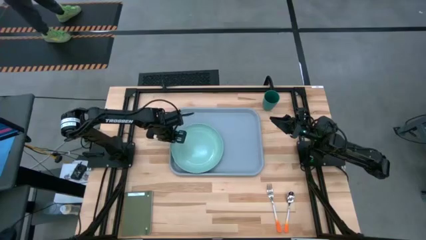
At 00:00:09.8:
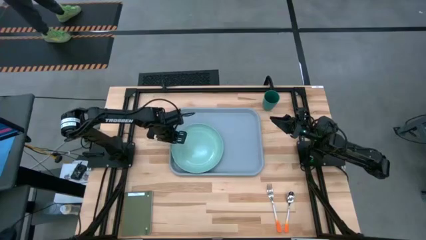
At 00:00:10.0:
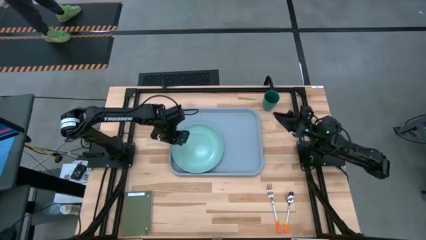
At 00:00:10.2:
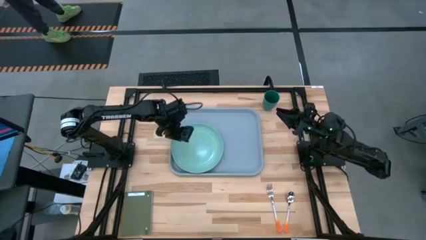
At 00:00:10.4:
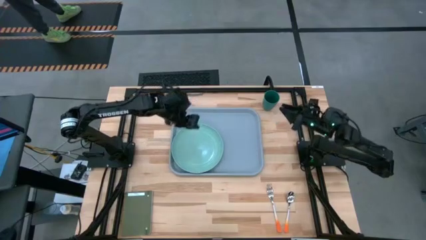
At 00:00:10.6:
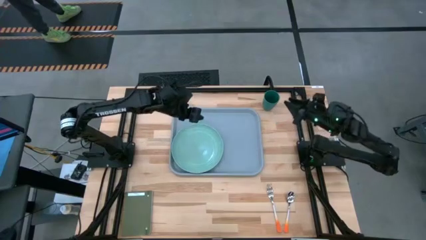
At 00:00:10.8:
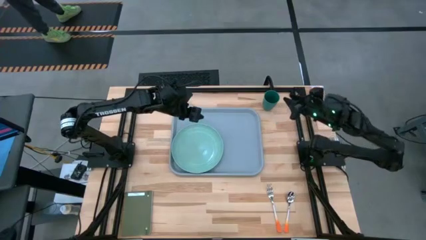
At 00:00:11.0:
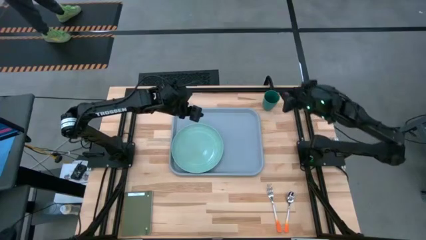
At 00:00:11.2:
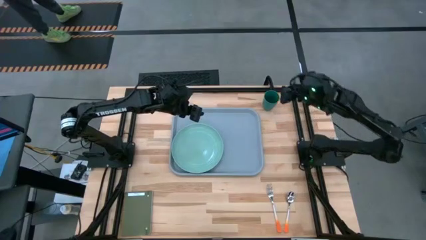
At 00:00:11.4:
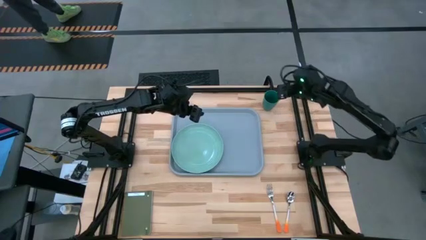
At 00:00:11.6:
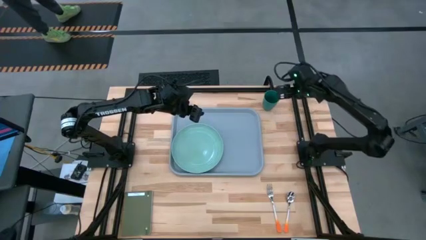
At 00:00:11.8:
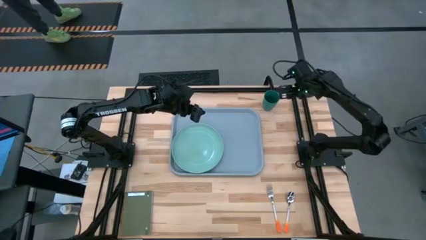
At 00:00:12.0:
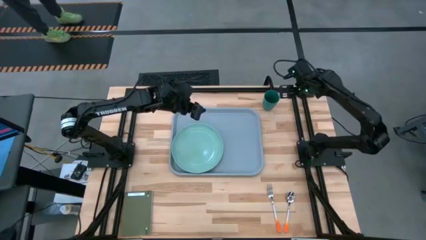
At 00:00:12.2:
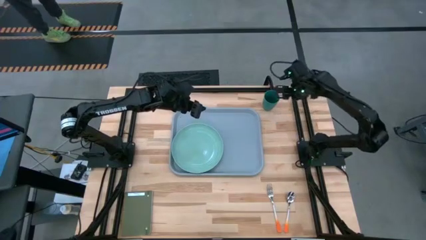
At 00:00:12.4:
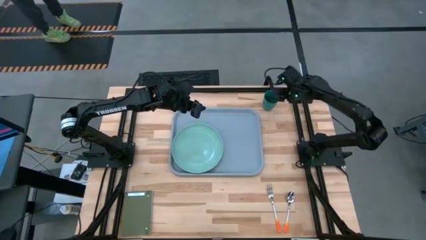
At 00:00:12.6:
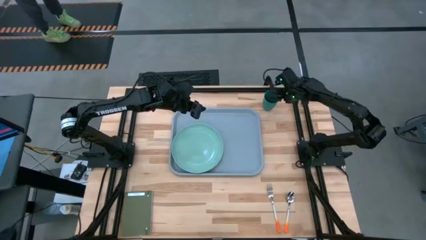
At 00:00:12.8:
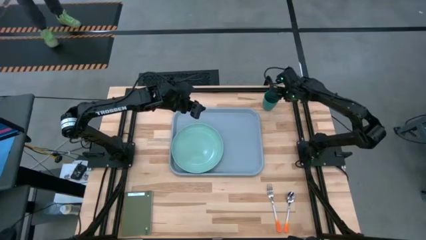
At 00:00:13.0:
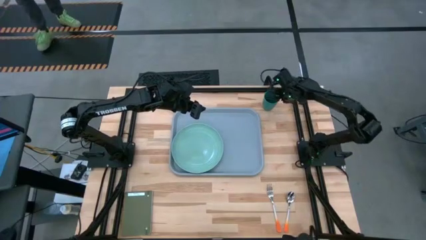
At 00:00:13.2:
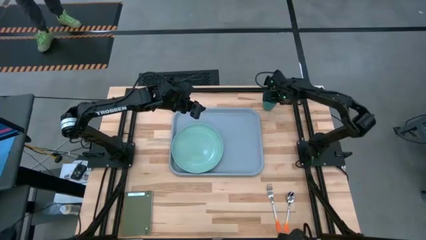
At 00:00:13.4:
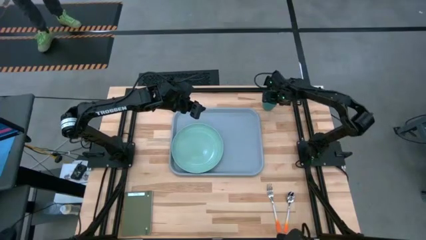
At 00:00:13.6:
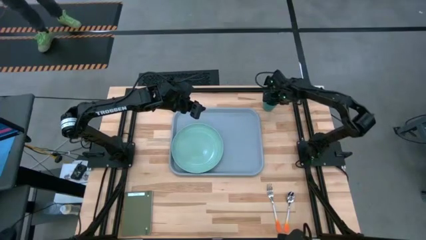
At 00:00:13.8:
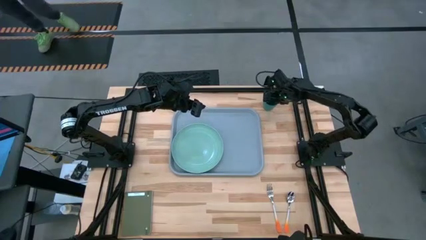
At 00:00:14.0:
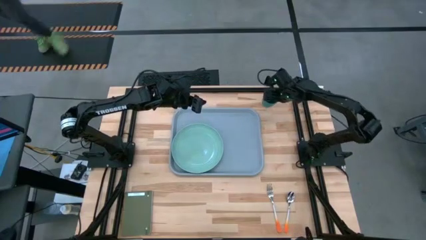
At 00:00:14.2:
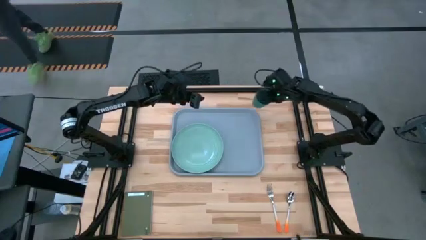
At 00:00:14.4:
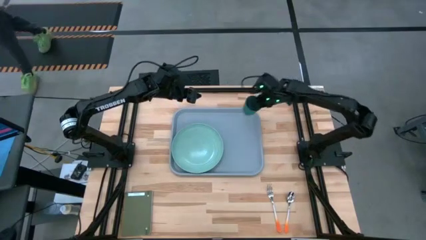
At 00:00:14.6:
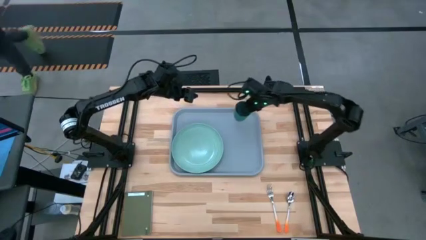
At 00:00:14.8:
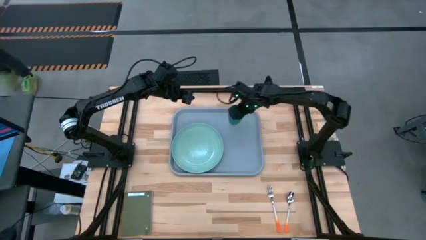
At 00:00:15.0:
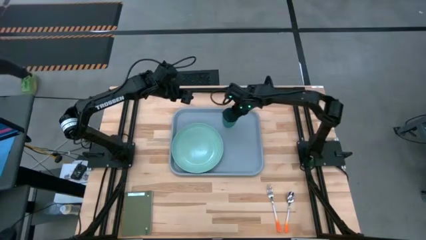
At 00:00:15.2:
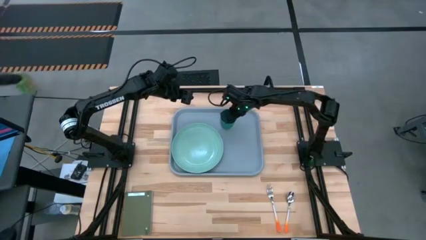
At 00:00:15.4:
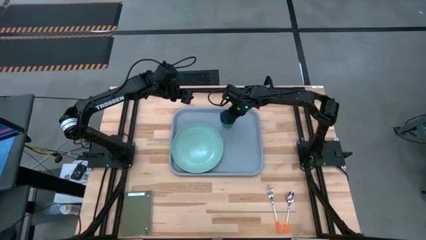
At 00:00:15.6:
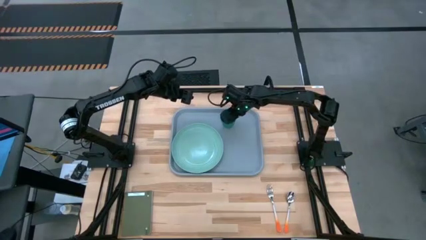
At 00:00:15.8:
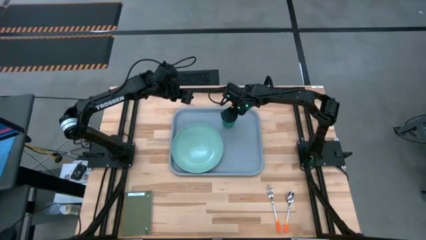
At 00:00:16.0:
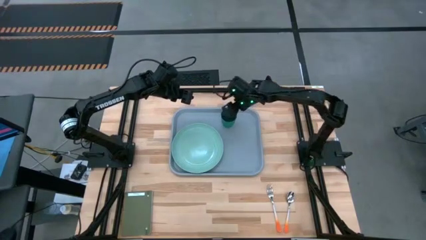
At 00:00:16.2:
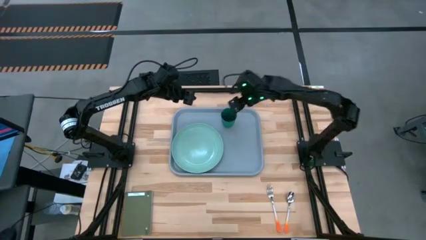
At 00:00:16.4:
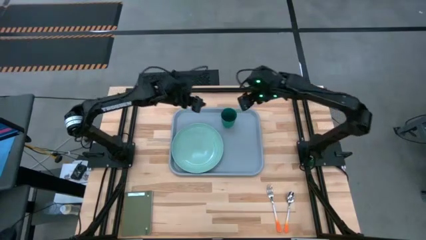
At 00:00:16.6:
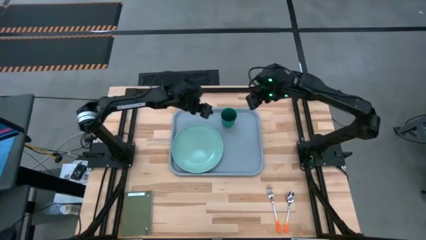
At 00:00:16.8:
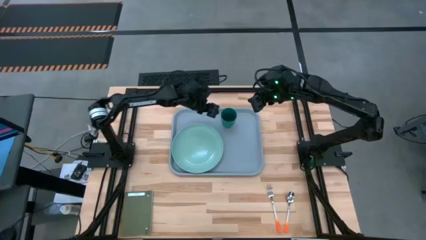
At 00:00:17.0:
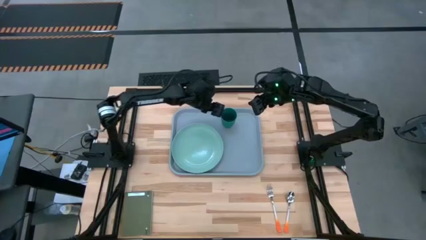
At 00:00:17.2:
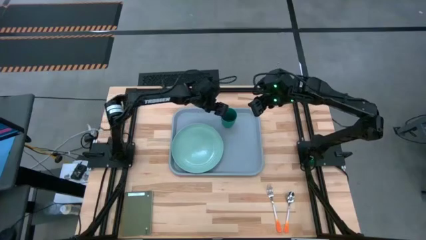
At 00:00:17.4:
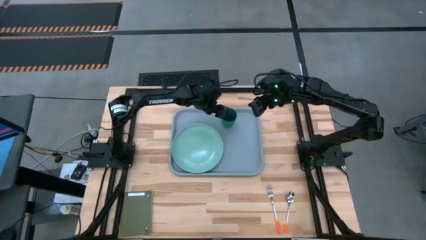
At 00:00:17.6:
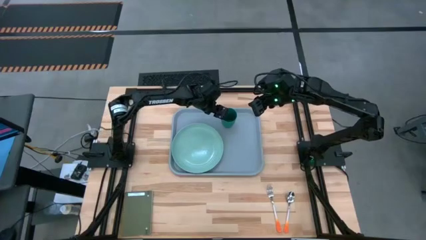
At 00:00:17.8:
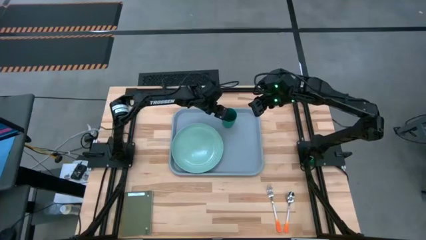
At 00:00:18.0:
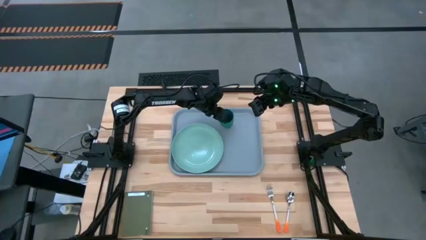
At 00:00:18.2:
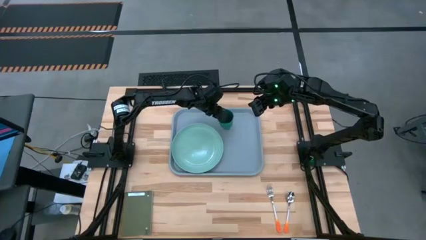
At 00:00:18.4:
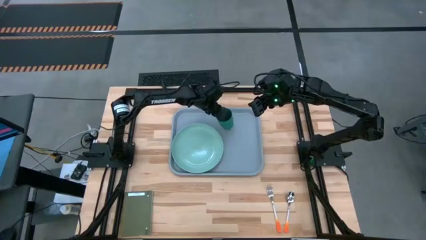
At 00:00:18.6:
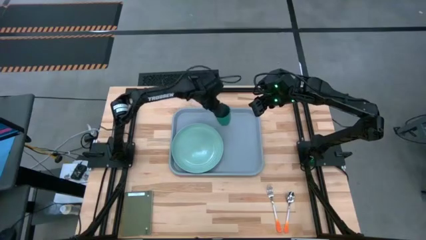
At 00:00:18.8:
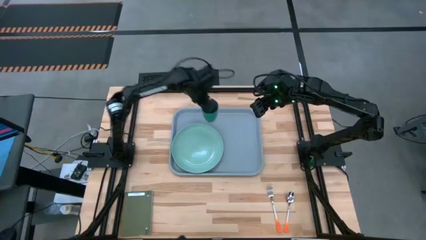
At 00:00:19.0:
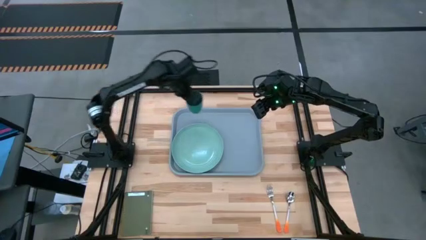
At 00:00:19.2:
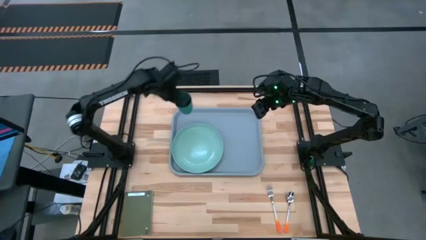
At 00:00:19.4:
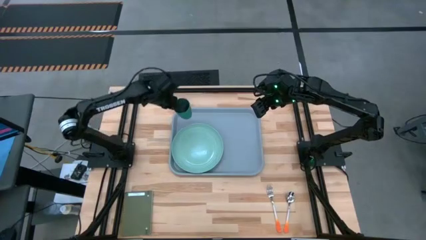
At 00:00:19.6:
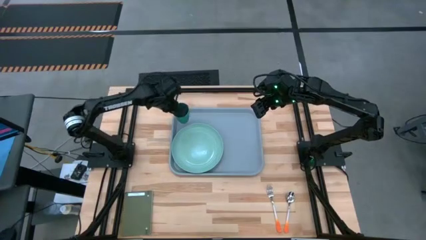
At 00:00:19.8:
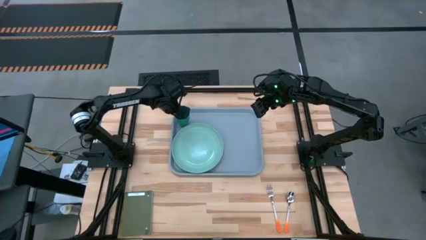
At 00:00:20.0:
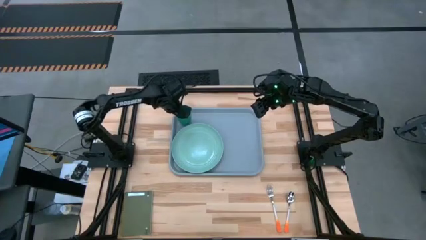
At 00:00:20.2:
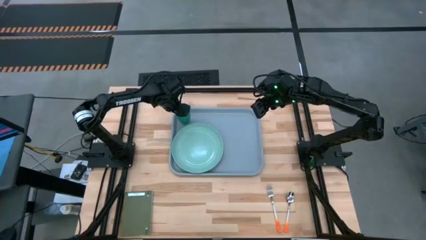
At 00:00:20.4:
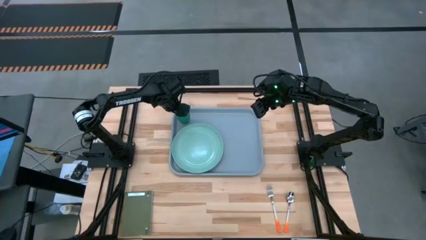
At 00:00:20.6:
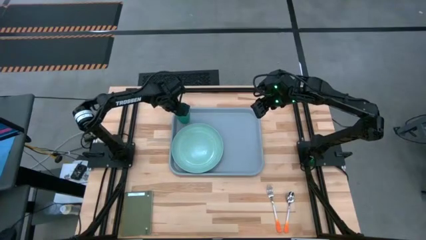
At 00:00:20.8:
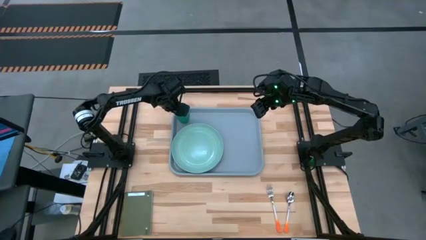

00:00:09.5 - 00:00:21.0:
Task: Pick and place plate/cup/fork/spoon on tray
Put the green cup on the gray tray to the top of the light green plate

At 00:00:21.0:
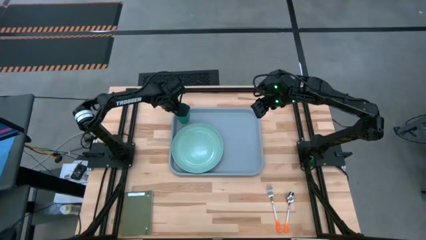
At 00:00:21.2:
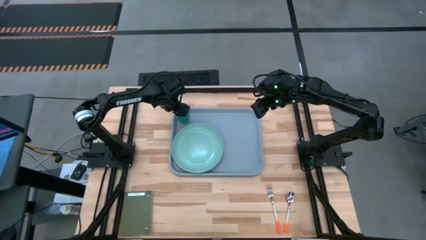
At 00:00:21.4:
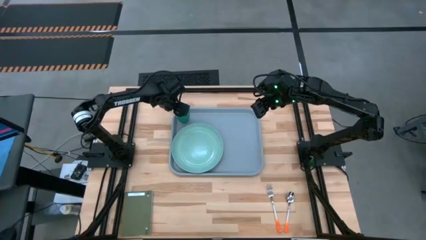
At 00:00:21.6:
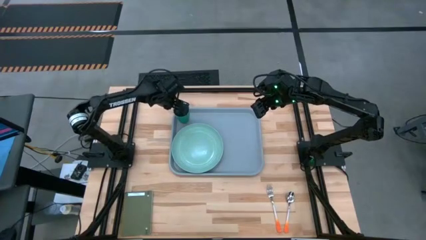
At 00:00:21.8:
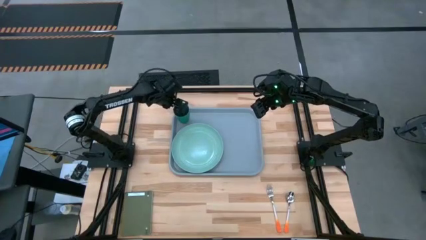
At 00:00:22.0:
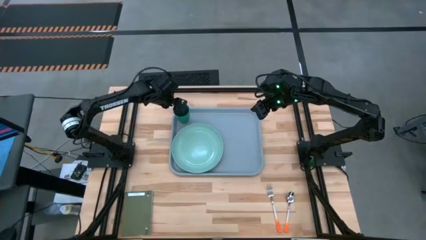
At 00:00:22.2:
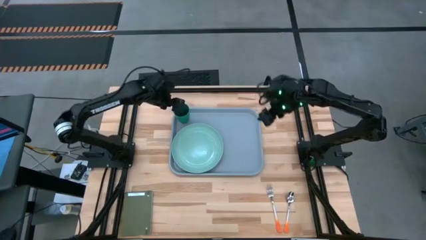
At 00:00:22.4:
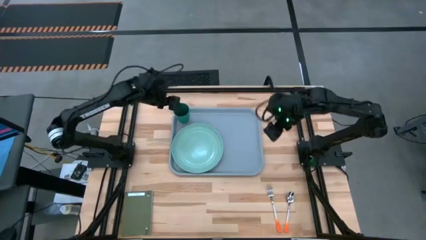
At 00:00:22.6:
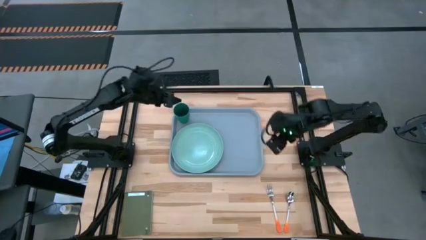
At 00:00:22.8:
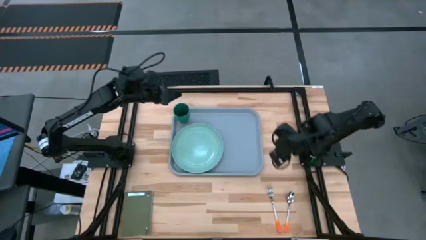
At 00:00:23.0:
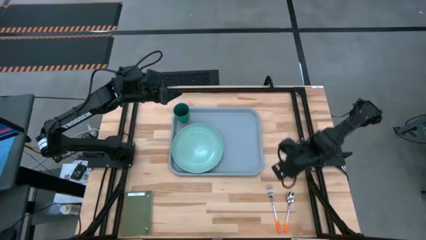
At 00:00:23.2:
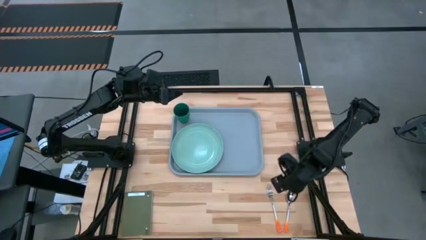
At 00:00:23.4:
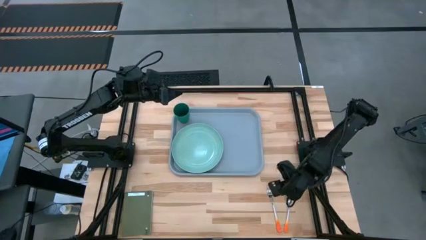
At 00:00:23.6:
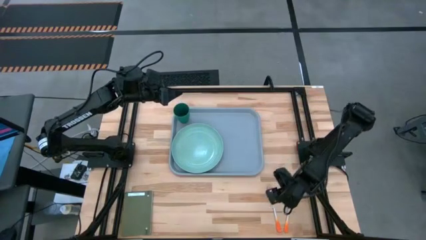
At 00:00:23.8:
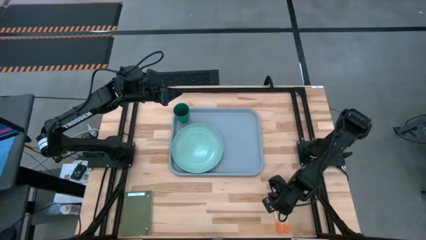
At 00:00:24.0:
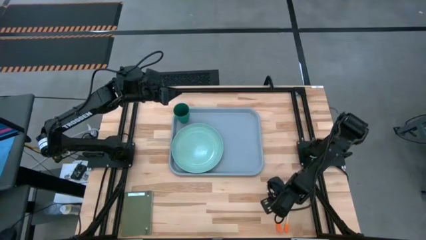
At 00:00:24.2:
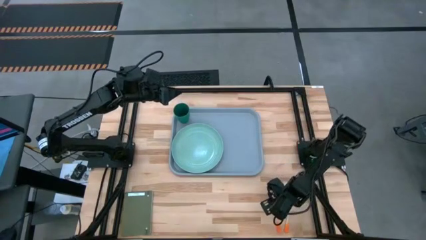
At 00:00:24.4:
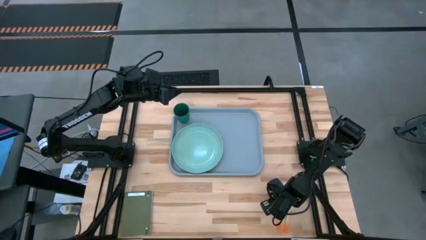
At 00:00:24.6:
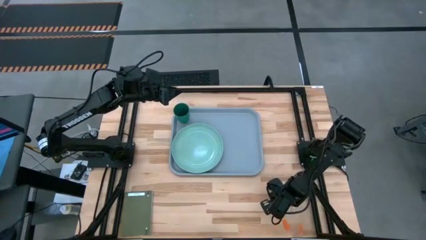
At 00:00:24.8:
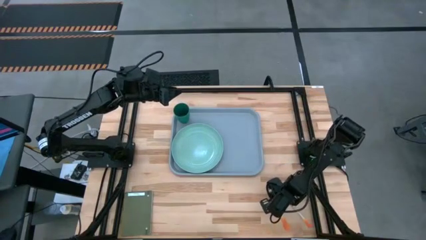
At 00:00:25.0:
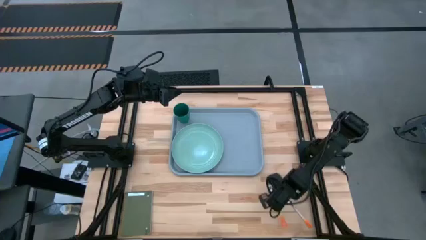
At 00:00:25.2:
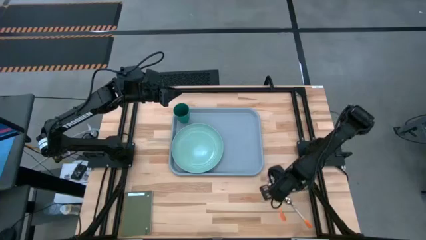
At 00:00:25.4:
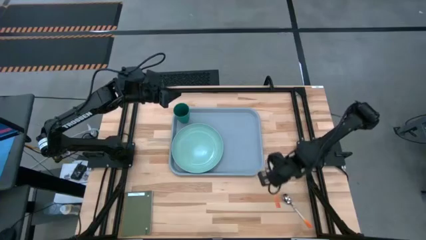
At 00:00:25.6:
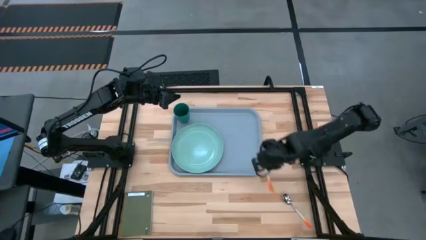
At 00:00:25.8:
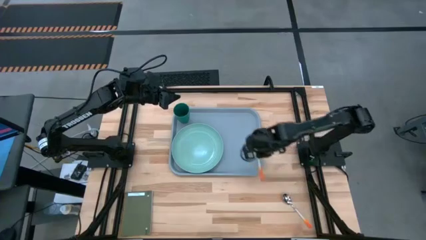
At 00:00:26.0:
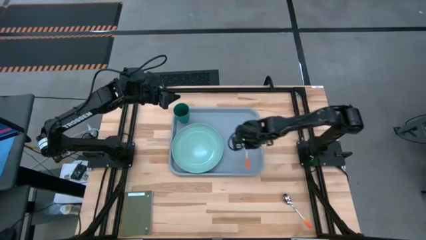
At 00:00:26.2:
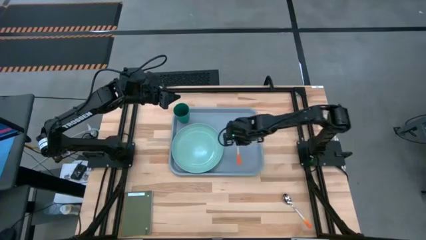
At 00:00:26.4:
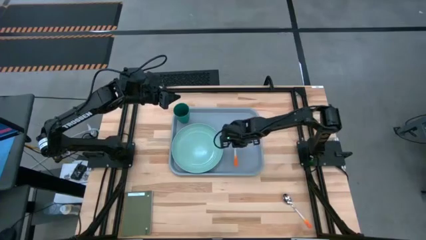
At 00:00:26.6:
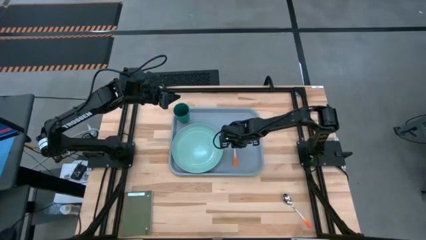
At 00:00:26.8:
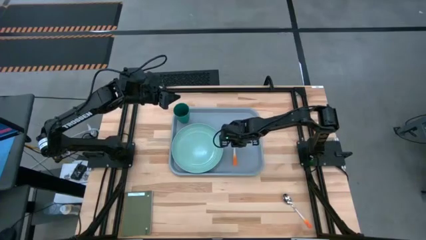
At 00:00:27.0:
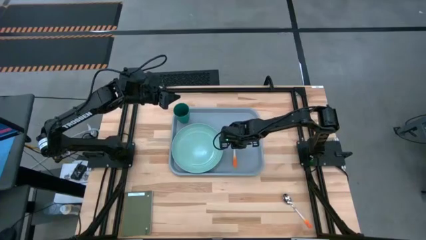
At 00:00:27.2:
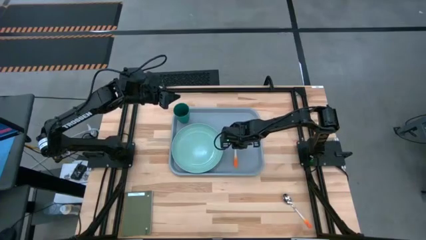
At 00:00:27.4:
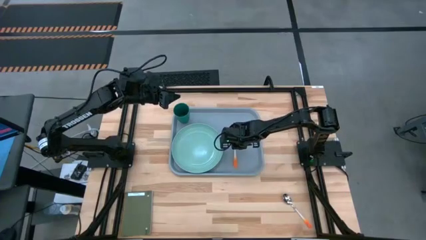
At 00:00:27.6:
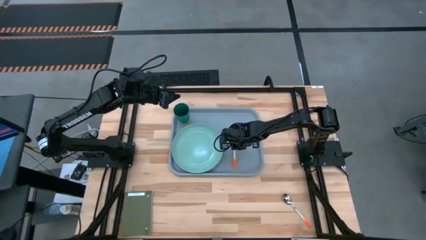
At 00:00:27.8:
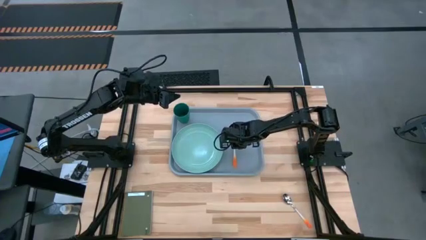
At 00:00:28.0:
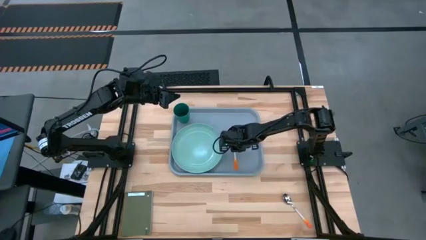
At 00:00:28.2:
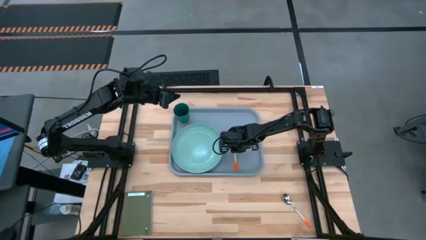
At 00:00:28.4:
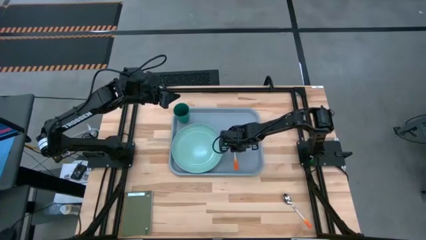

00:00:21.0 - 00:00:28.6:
Put the orange fork on the gray tray to the right of the light green plate
